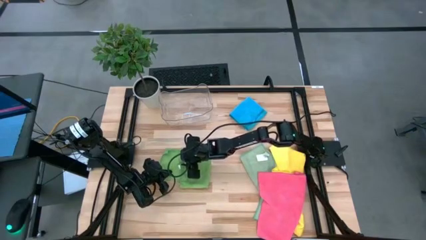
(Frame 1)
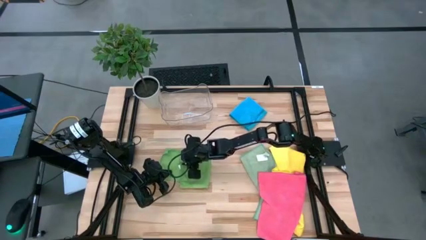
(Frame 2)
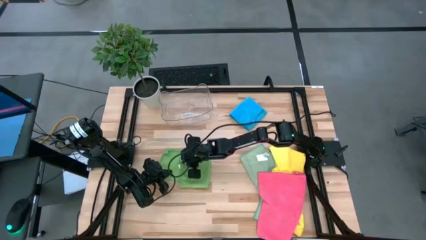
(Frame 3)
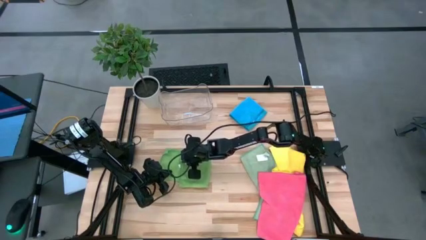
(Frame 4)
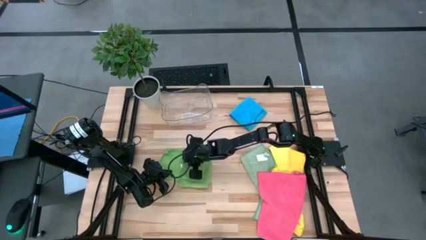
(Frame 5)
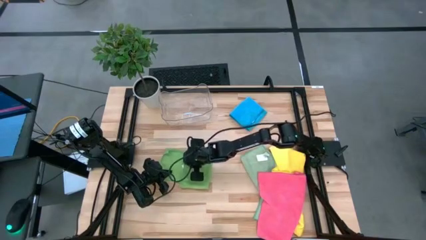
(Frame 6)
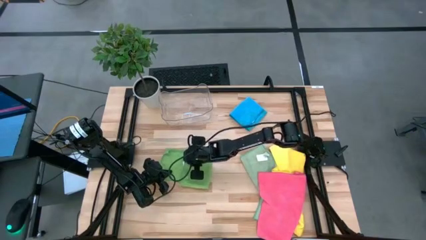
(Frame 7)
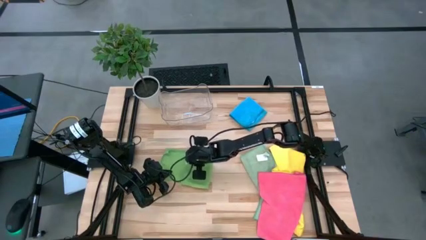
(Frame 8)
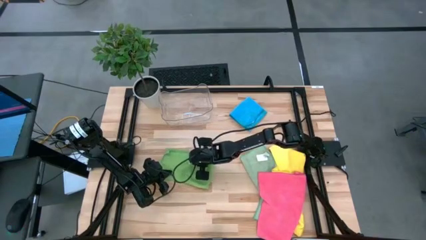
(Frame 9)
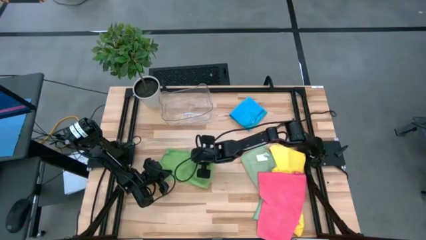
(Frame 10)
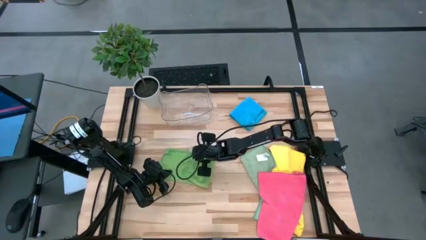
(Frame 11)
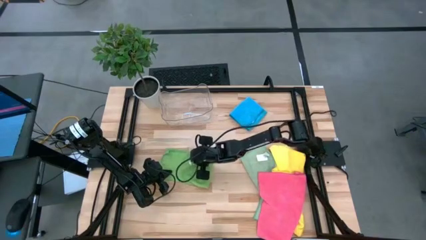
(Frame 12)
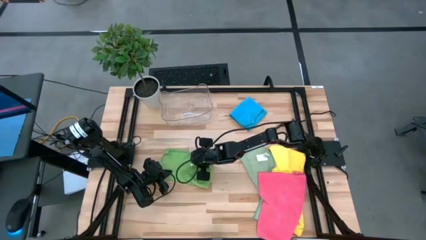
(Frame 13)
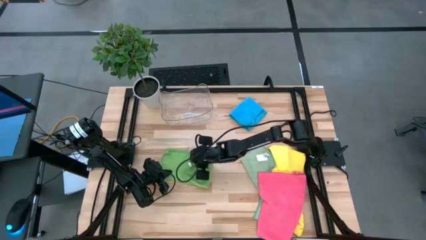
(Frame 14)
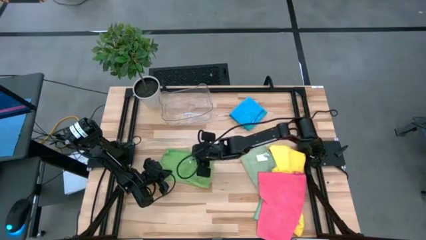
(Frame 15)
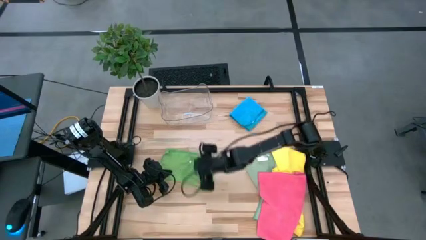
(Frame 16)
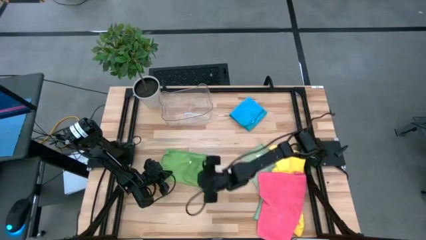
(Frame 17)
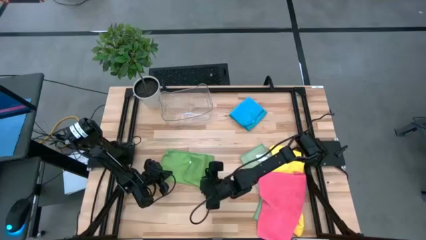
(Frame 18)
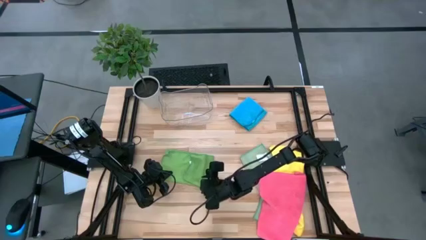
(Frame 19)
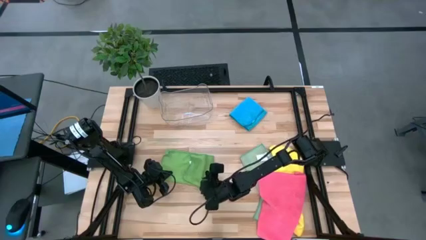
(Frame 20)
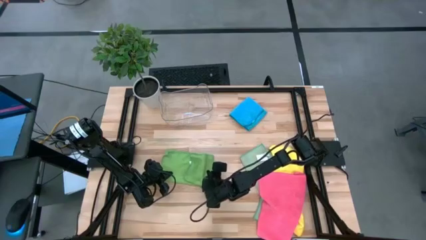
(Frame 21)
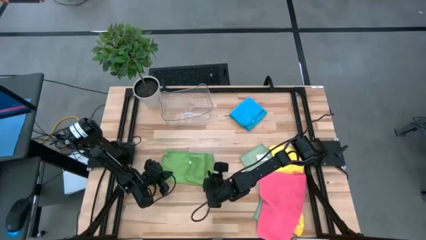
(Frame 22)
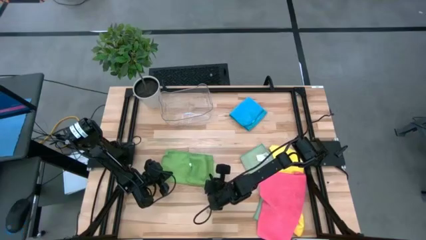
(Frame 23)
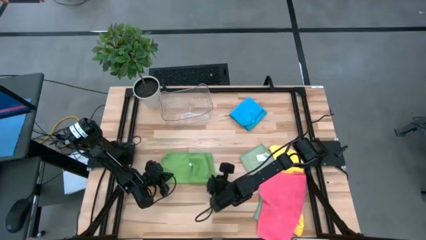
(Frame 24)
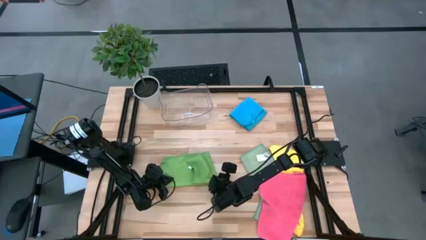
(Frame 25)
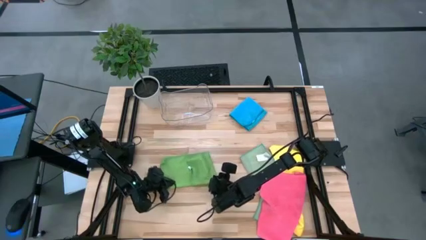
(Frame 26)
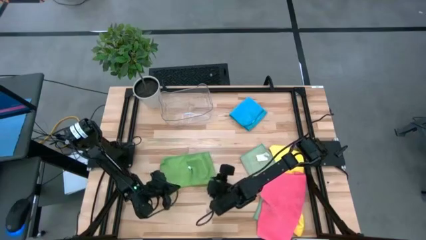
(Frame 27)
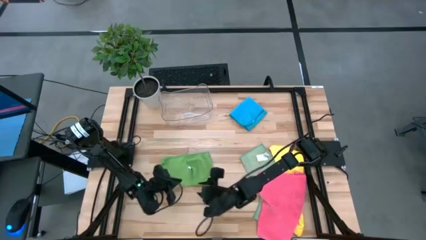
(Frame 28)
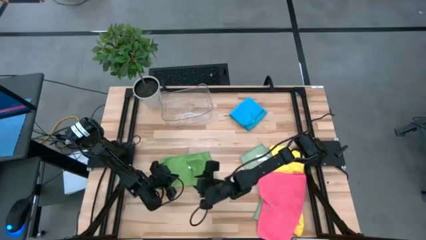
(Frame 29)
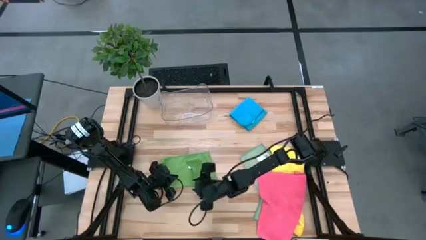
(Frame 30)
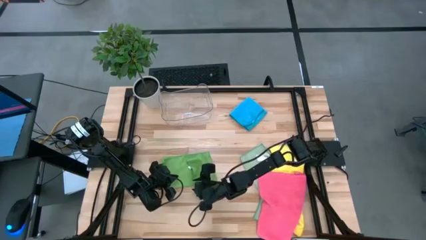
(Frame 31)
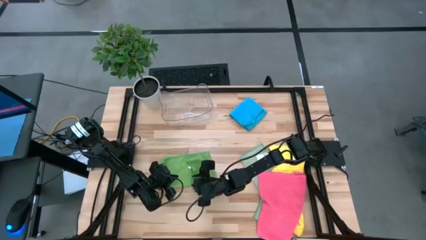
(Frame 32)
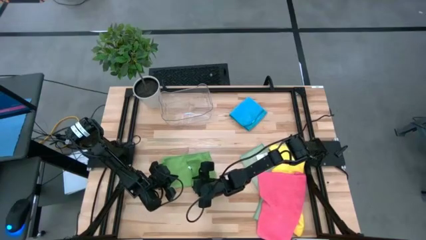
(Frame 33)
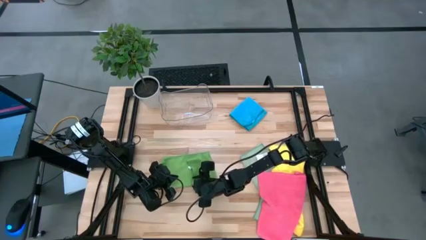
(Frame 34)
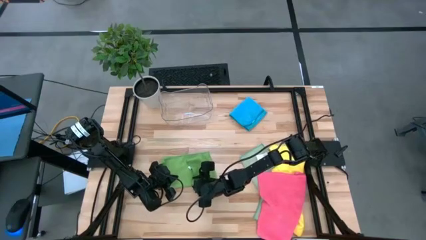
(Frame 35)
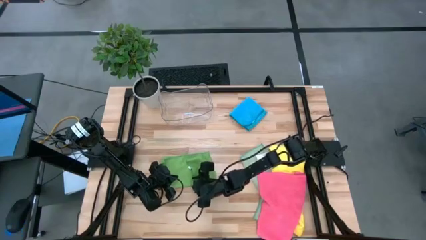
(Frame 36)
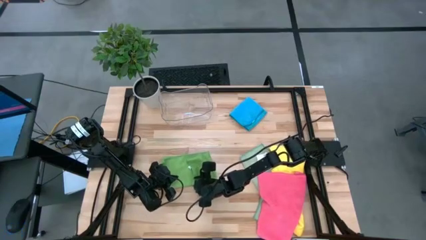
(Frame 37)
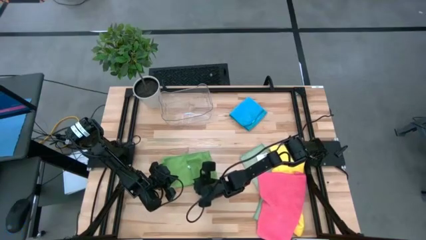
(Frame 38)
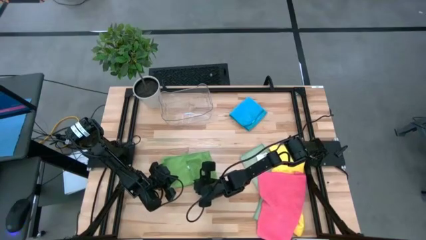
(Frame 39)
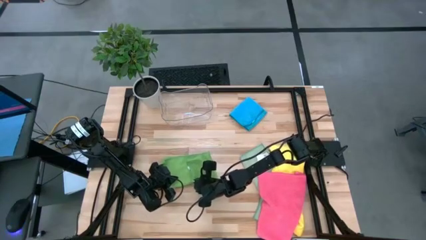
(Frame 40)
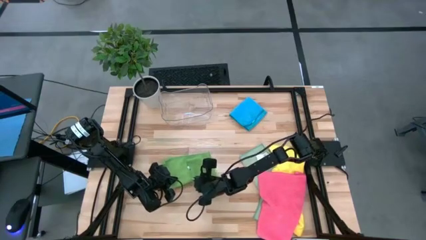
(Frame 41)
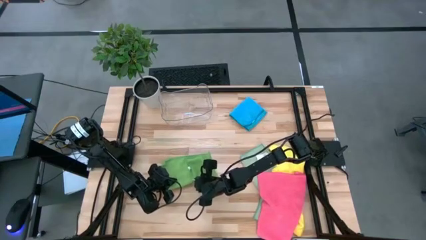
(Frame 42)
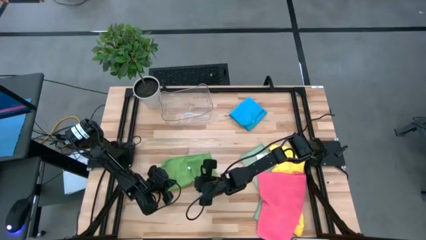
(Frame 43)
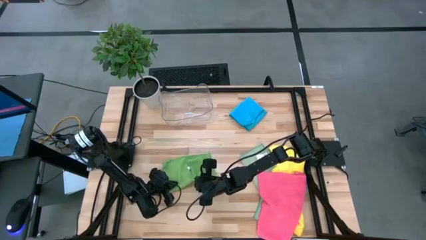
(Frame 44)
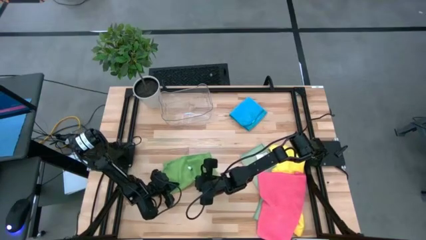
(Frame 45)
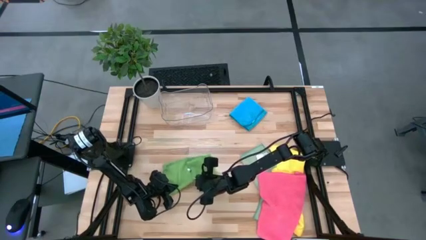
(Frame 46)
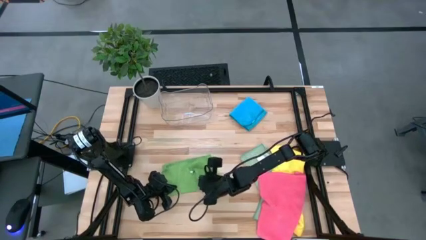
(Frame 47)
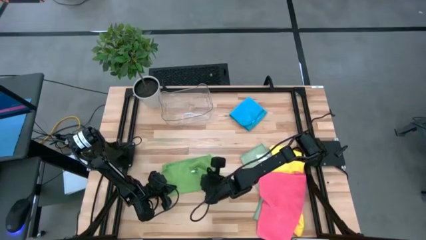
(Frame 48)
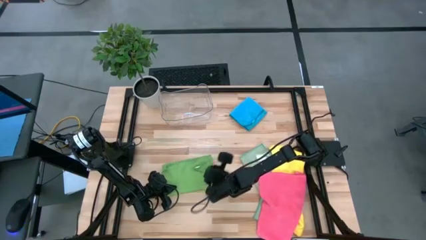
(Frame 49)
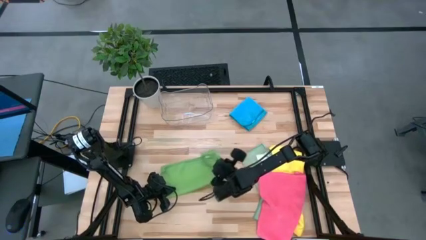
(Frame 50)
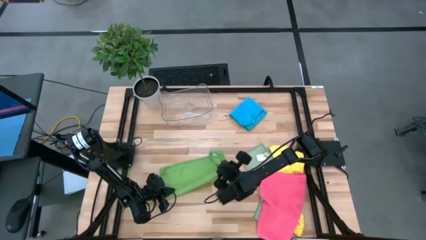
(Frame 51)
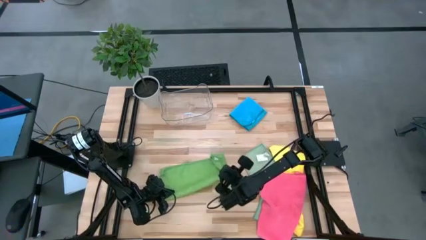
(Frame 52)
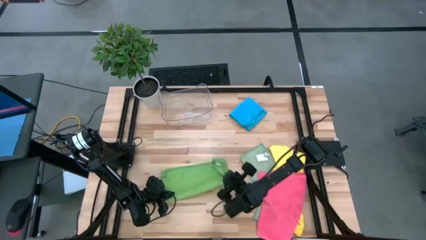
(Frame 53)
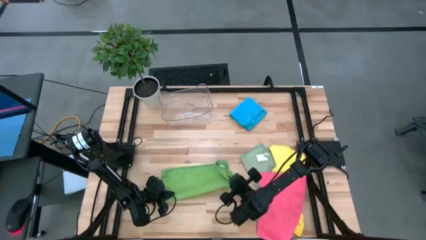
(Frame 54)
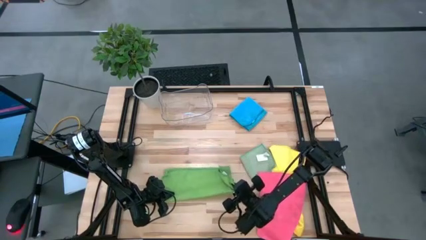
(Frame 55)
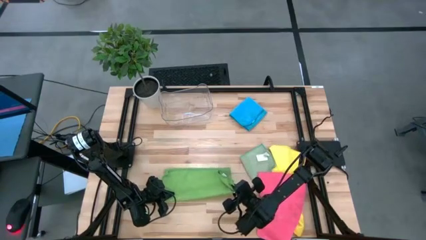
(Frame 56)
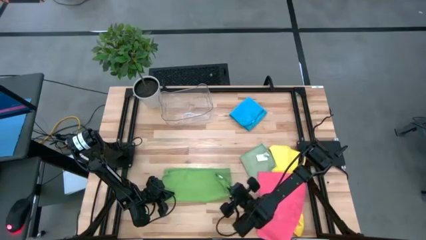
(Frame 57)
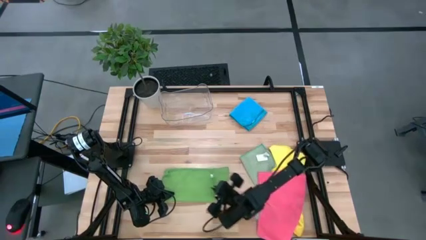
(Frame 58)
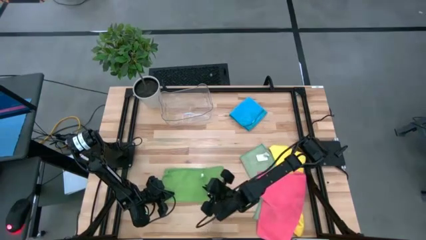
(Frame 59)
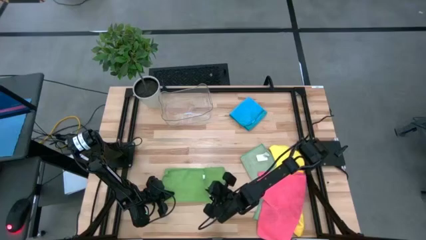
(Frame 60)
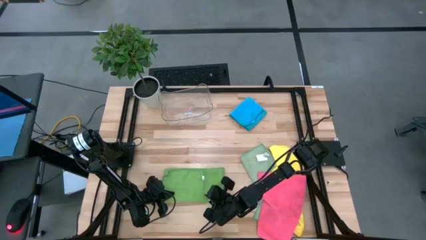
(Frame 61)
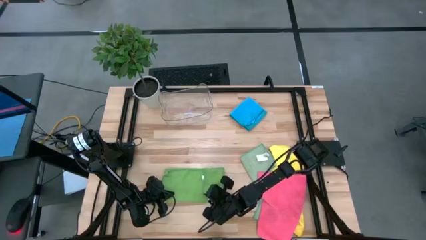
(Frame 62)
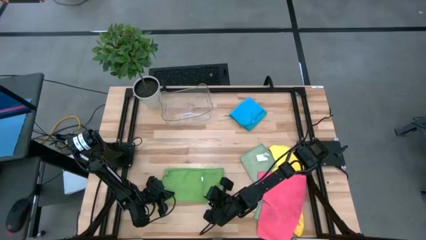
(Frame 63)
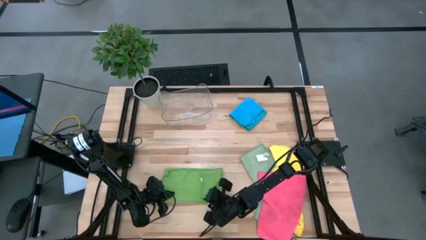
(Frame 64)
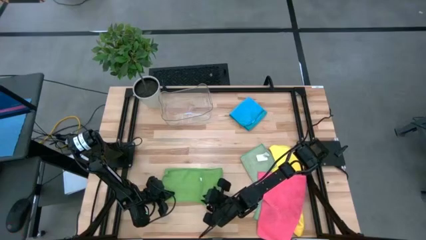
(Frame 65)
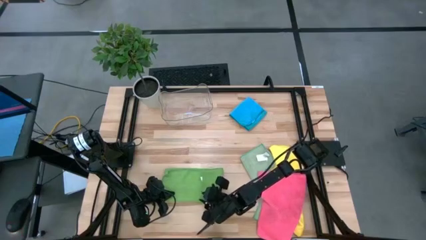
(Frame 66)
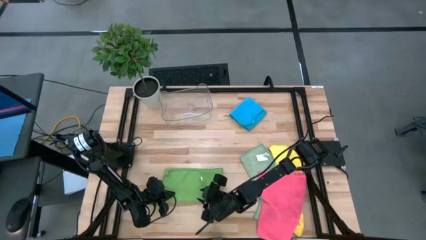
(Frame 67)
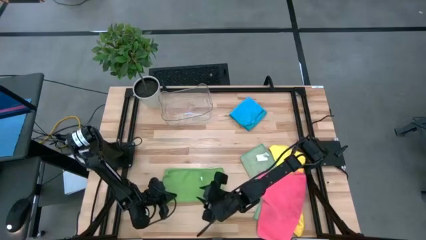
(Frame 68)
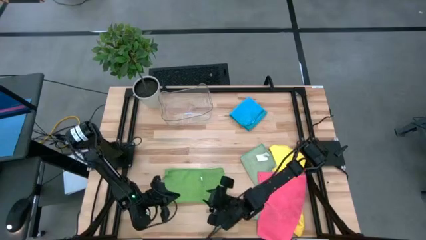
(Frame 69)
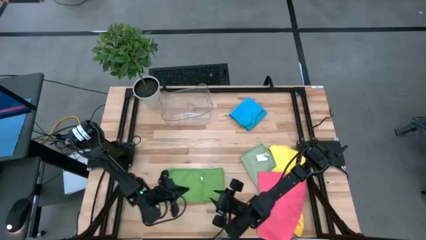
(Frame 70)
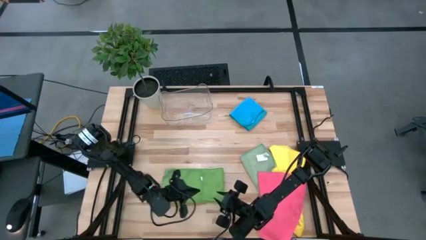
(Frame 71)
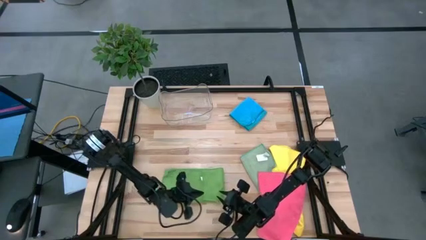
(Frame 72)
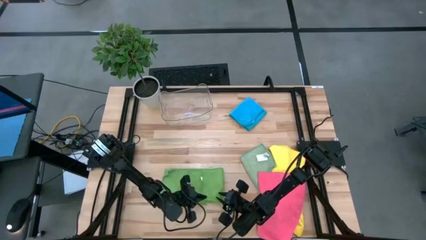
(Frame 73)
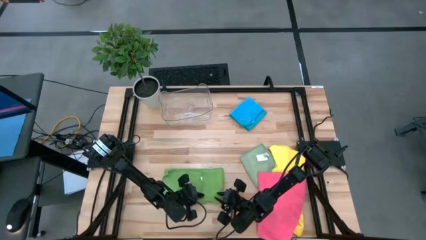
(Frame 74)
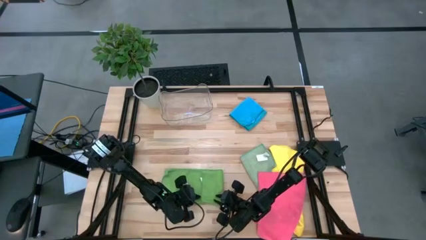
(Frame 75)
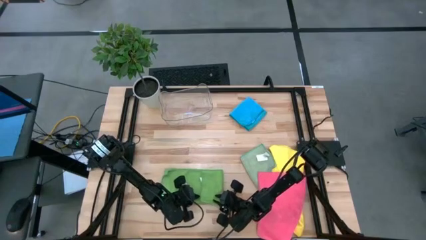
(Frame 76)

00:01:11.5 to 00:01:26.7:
Task: Fold microfiber towels
Fold the green microfiber cloth
